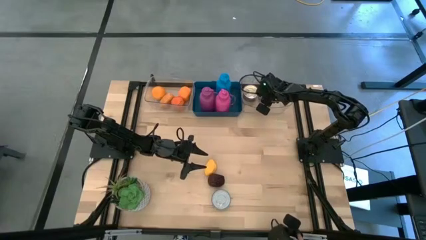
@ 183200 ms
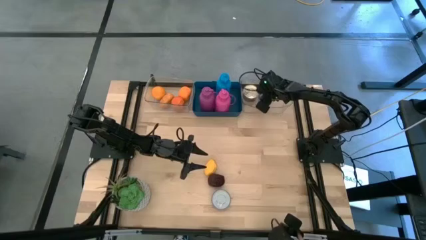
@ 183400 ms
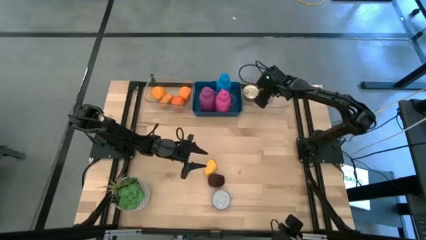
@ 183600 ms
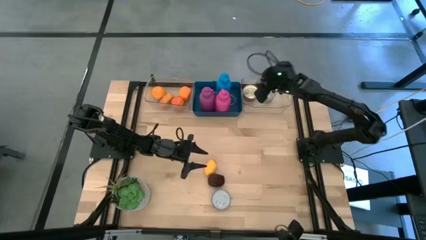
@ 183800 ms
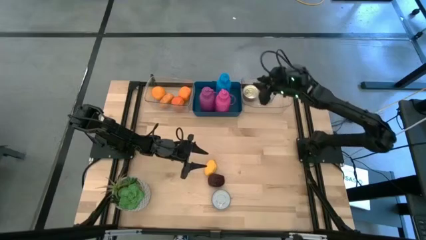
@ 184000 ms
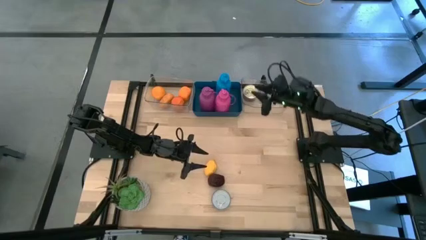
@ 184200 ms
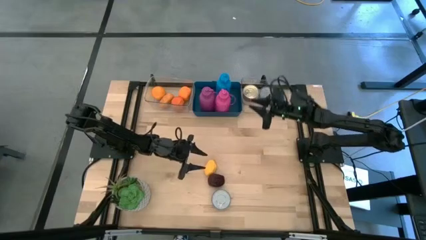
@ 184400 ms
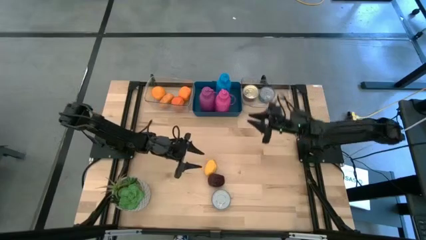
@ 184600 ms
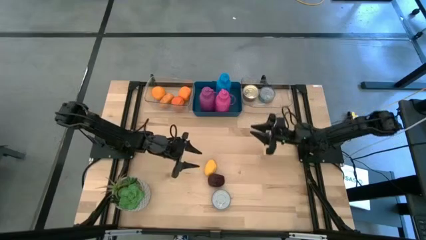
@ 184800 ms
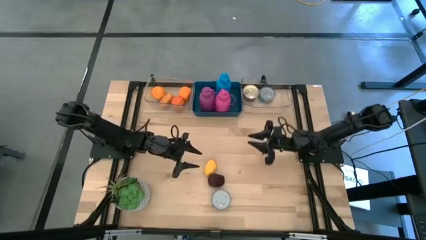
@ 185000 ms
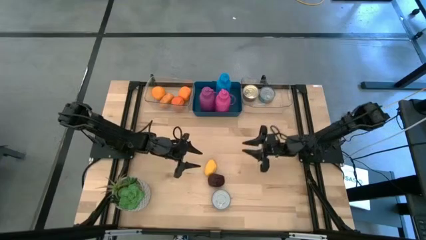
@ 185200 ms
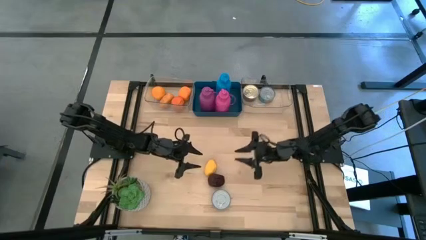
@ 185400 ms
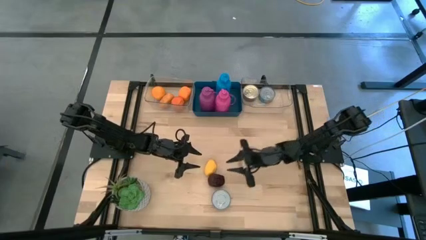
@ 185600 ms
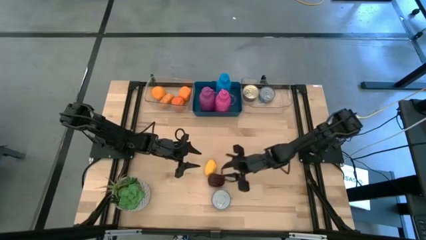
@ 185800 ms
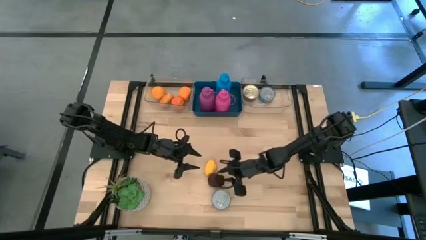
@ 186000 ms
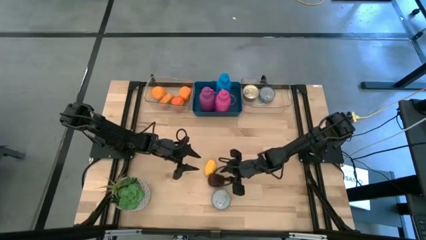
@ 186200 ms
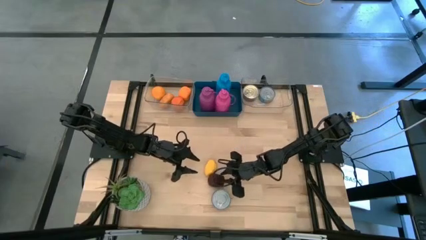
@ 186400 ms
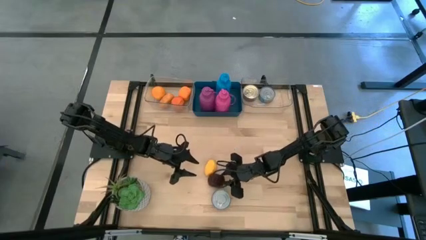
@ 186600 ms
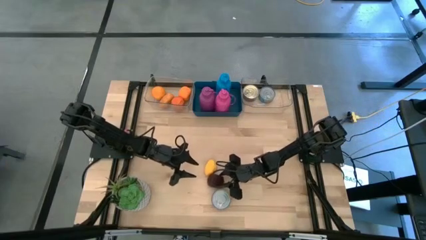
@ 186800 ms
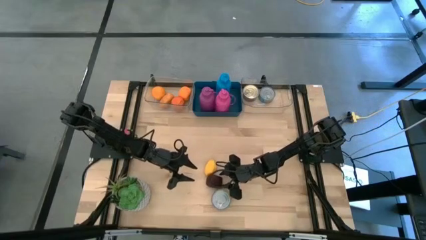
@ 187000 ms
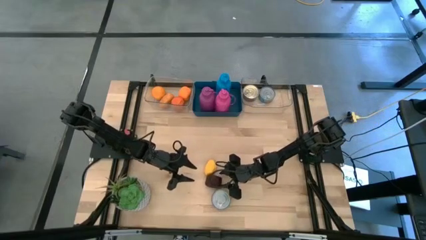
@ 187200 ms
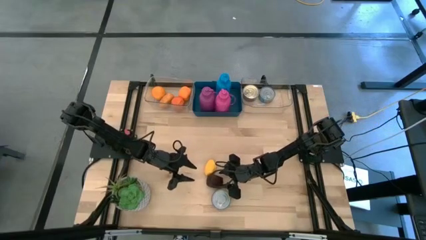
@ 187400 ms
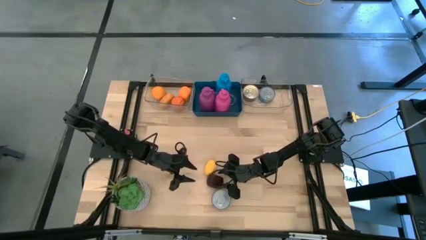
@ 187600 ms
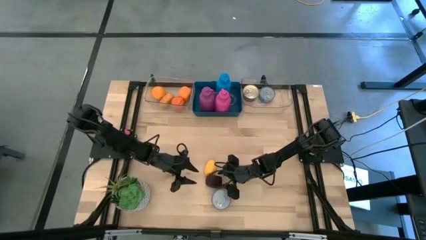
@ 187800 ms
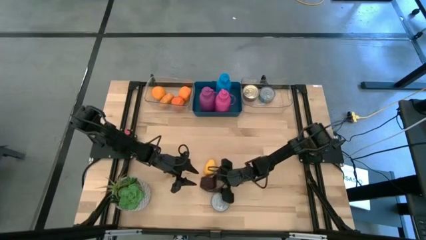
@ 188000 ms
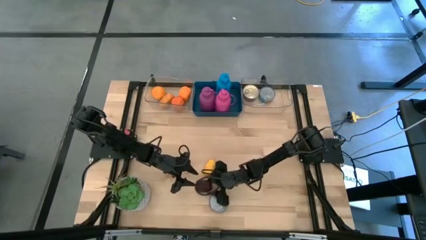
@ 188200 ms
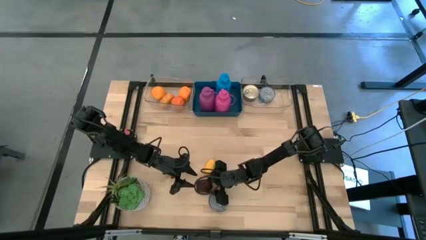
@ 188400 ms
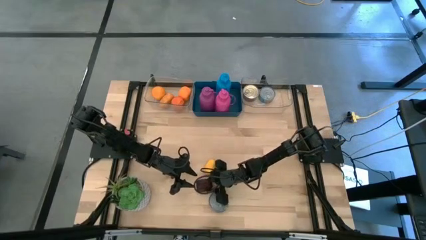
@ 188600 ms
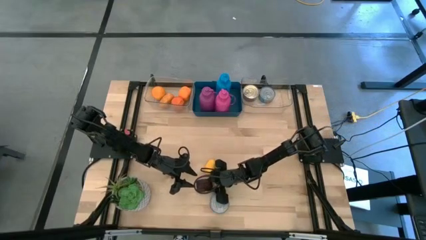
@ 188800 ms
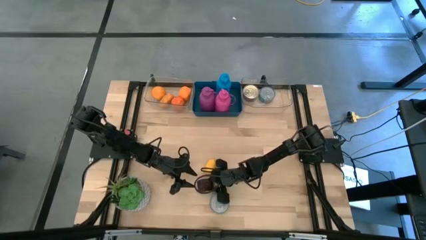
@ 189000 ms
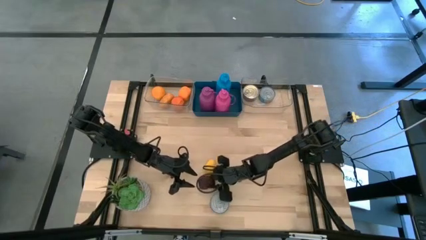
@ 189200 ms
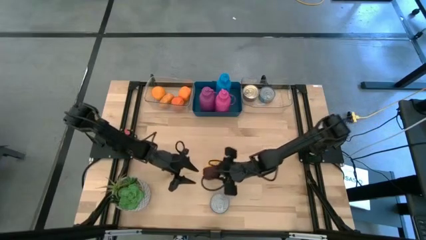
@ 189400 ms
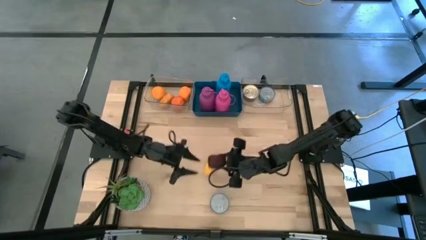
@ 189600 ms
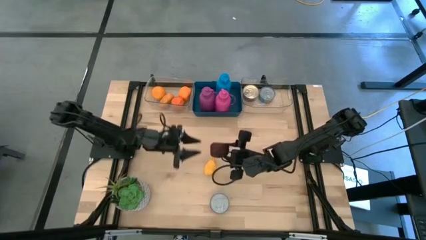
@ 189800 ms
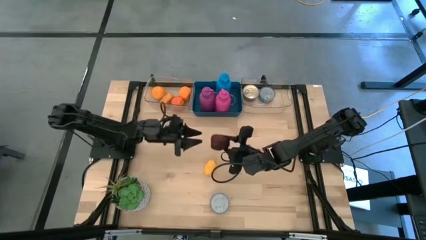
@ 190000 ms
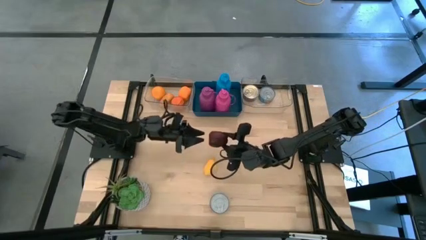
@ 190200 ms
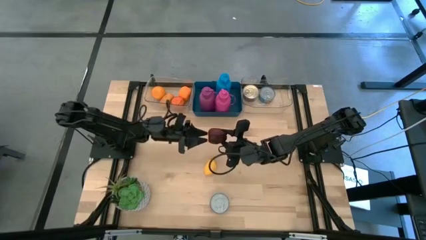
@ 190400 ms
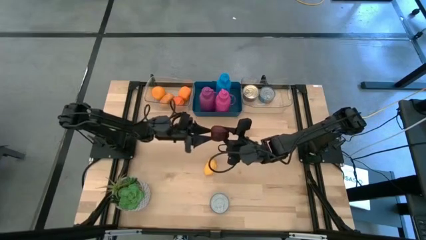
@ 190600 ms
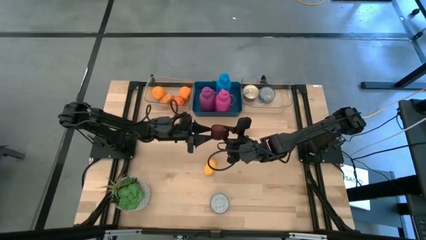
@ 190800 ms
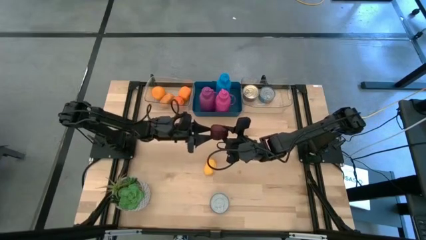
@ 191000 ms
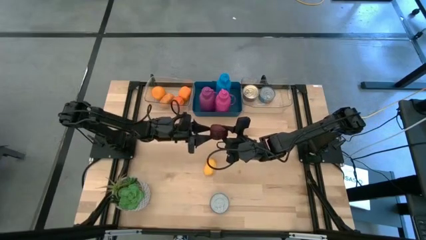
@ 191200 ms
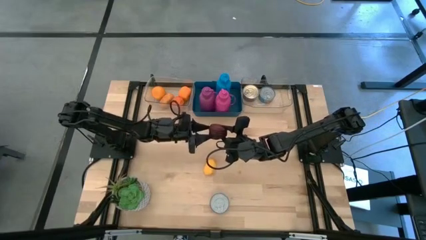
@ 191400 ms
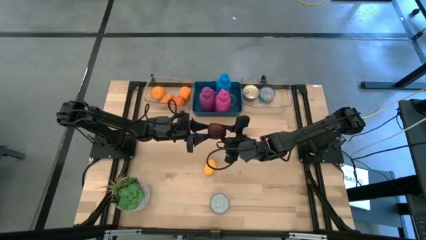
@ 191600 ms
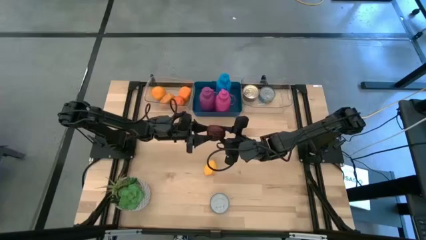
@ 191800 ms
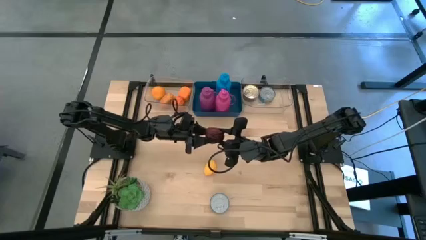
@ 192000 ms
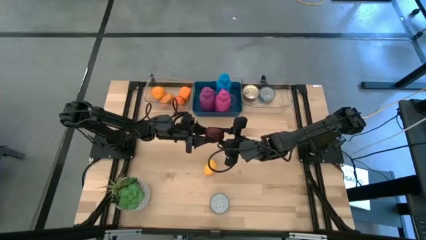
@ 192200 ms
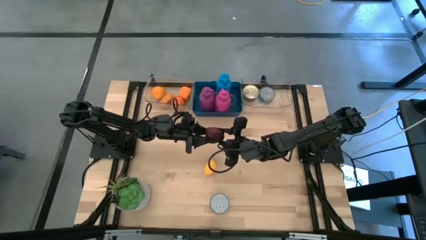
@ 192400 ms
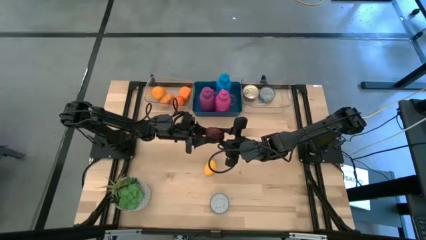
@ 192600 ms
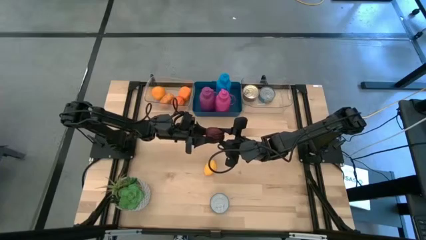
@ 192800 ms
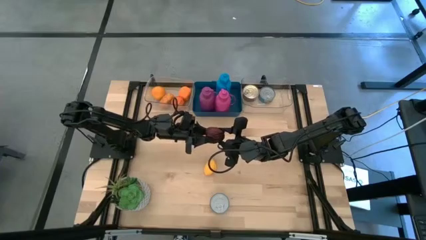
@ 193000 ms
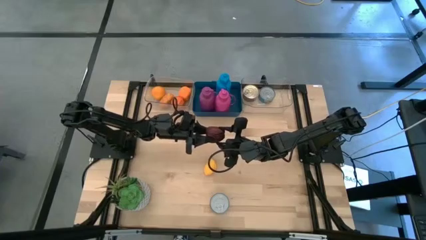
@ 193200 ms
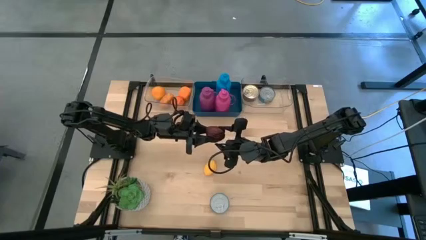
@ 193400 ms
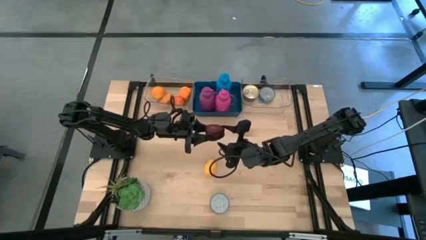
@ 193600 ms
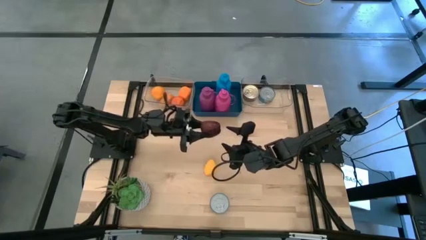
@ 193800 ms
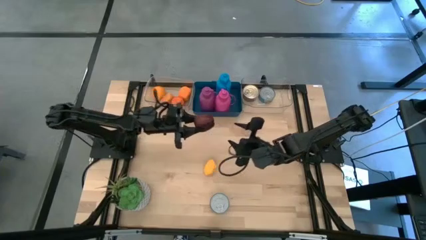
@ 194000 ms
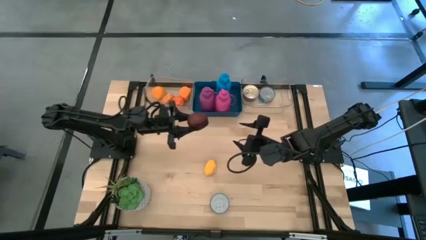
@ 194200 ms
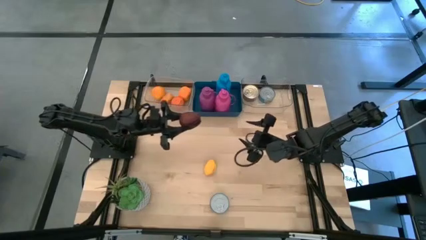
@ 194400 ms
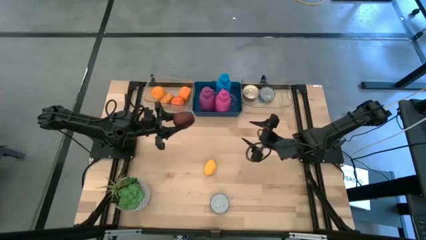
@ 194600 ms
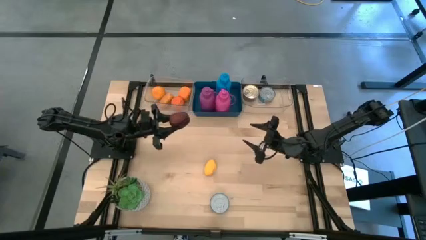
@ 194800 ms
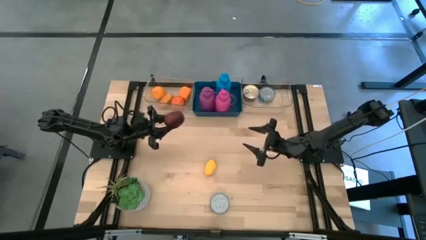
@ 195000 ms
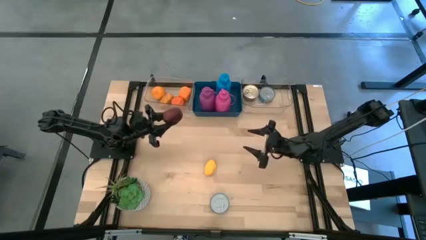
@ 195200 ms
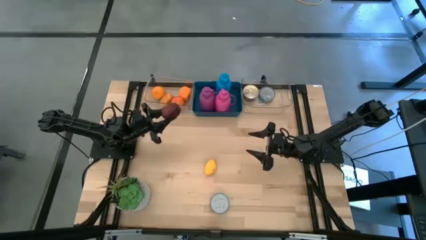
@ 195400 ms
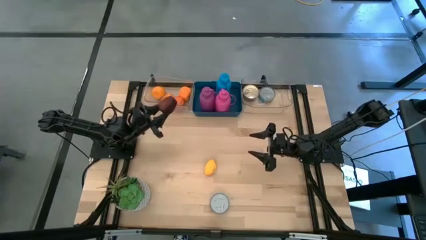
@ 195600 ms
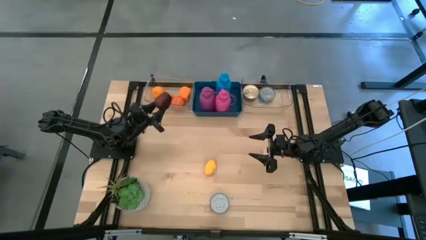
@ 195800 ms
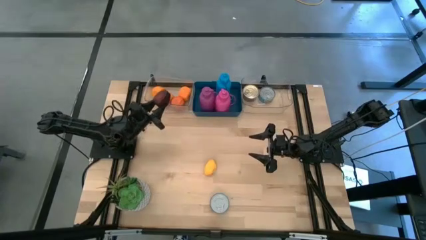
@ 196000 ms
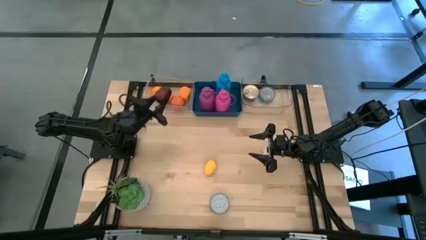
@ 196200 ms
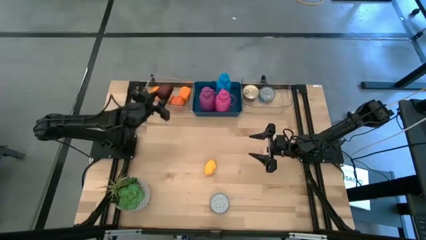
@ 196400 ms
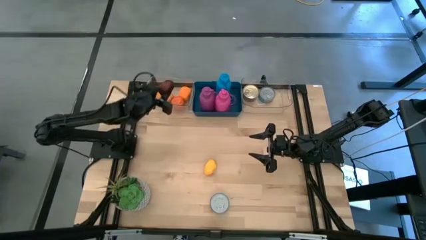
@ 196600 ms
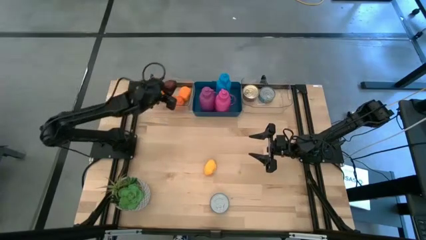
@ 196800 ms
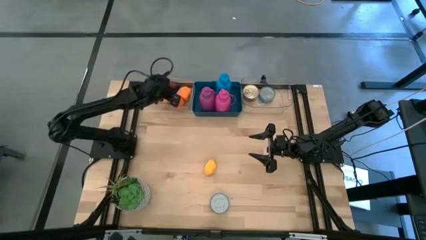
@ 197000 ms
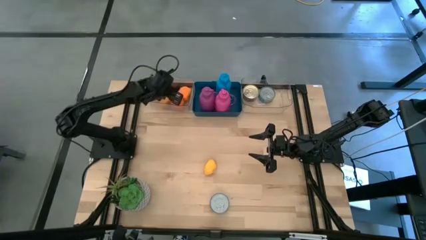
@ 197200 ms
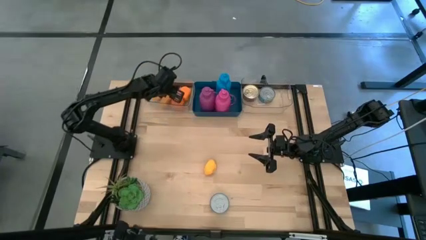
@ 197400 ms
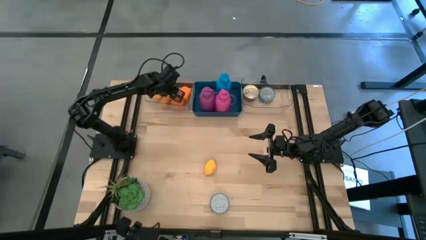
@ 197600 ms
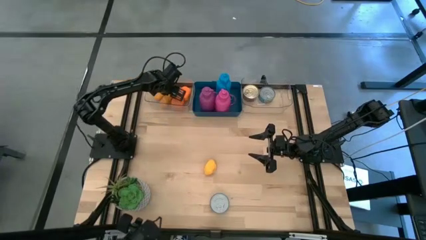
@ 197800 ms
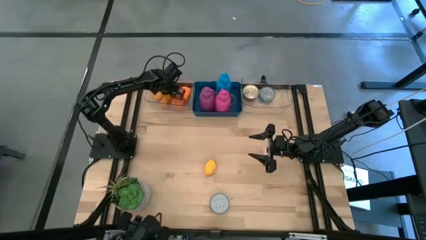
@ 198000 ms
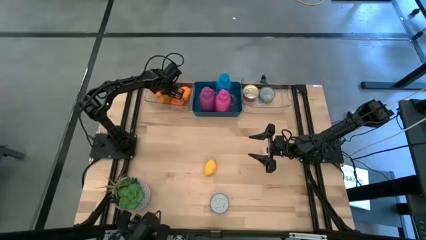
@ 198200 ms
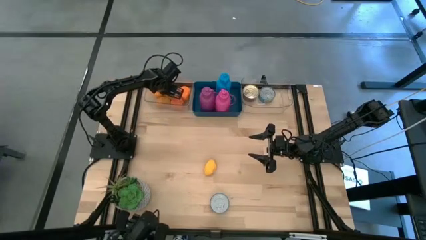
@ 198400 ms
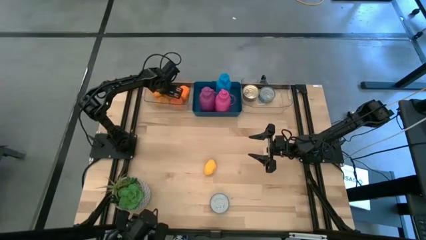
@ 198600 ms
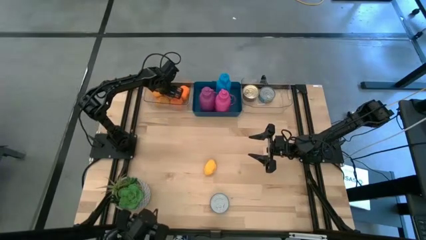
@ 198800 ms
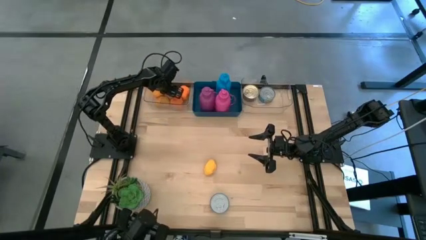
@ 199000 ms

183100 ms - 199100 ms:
Task: Pick & Place Food Item
Put the apple into the left transparent bin

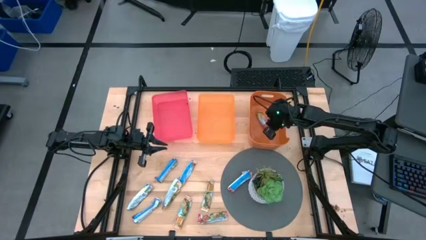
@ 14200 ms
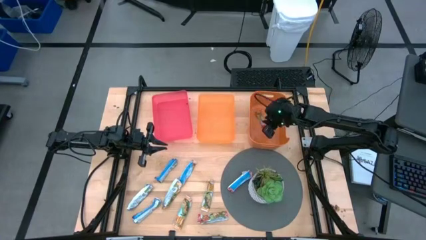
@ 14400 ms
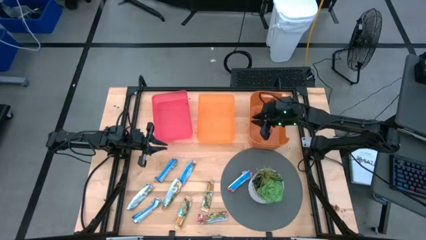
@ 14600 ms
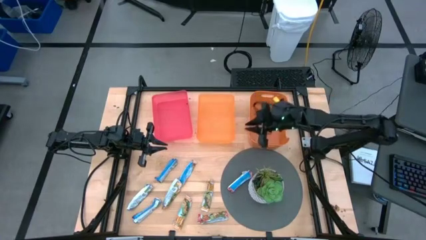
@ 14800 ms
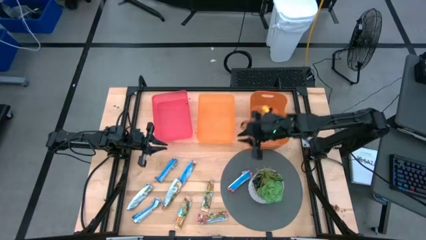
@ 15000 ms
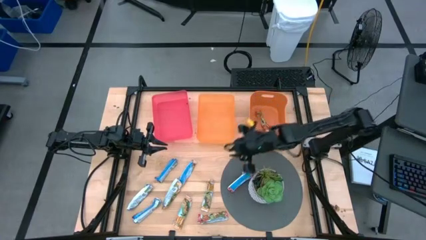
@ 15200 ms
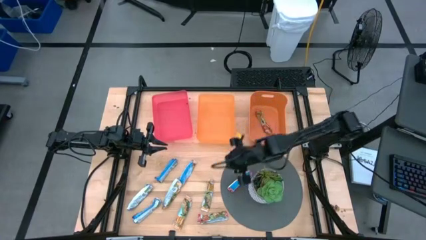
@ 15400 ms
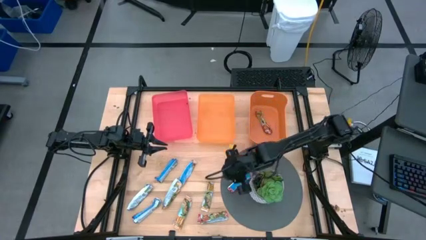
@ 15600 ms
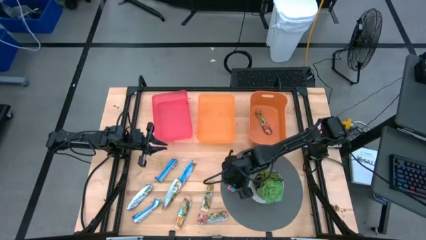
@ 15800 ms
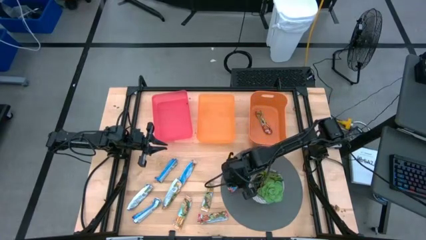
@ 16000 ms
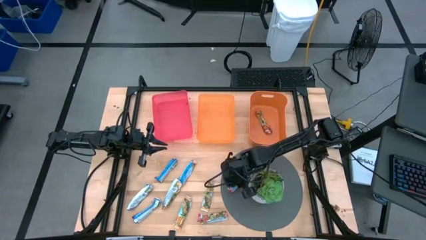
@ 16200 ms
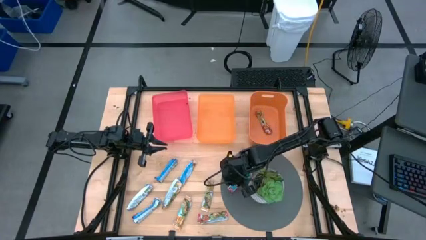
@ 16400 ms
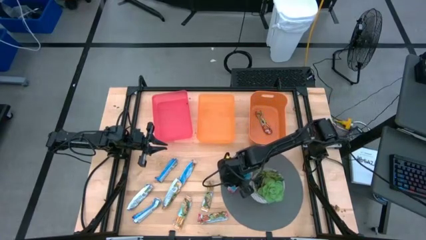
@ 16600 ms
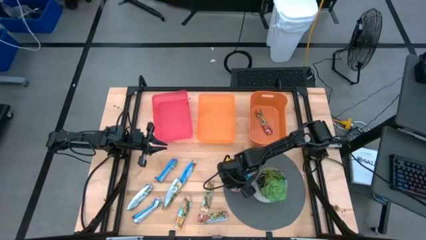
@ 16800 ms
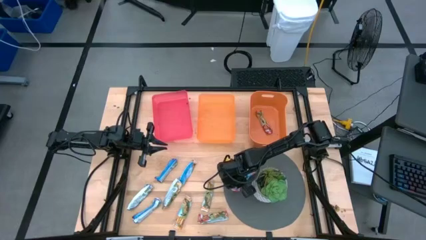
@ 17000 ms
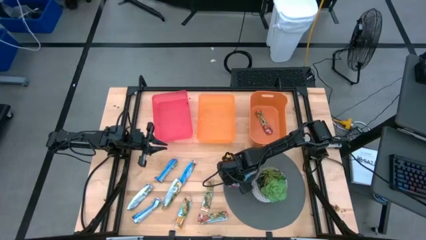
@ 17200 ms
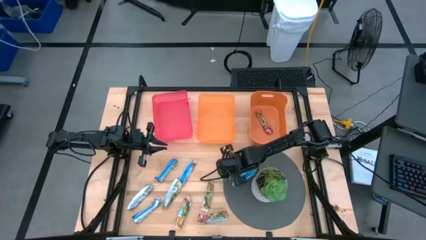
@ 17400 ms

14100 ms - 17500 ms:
Task: Pick and place Granola Bars by type
Put the top red granola bar into the right orange bin
